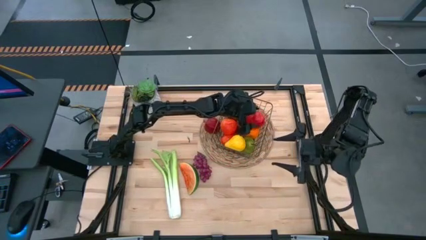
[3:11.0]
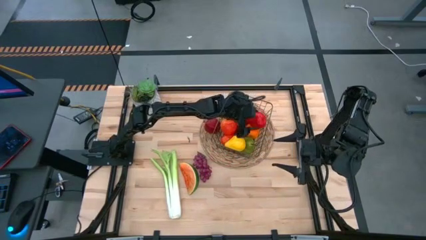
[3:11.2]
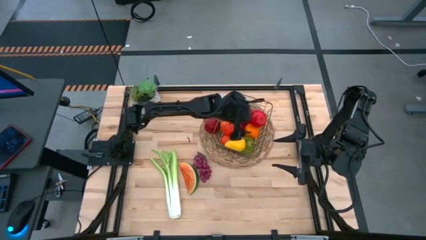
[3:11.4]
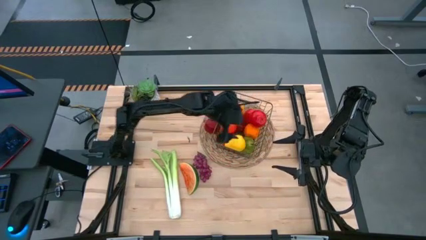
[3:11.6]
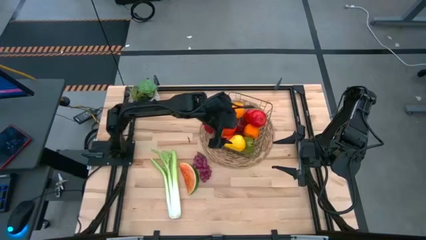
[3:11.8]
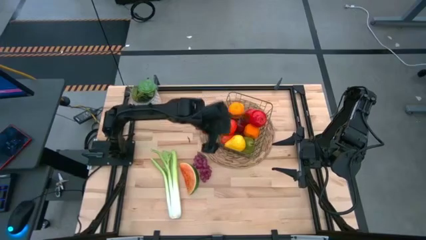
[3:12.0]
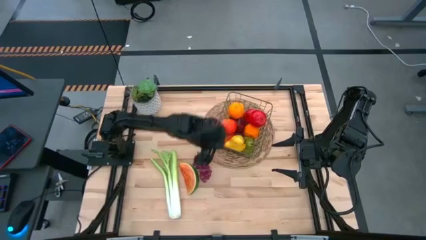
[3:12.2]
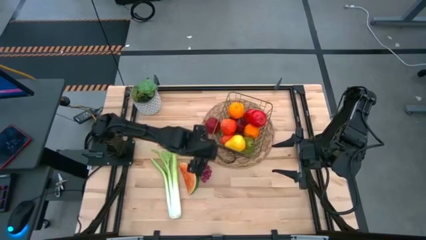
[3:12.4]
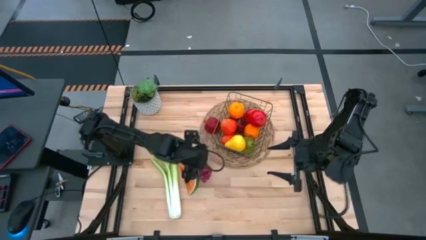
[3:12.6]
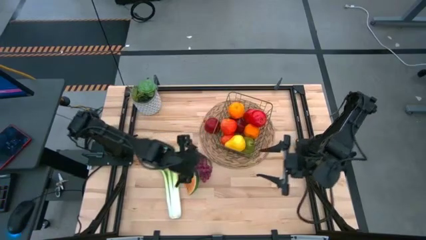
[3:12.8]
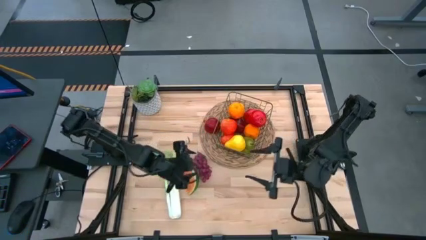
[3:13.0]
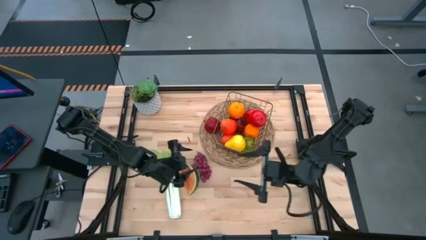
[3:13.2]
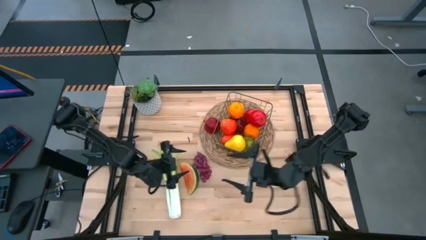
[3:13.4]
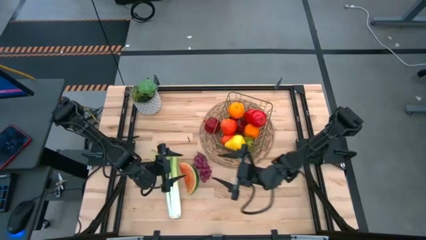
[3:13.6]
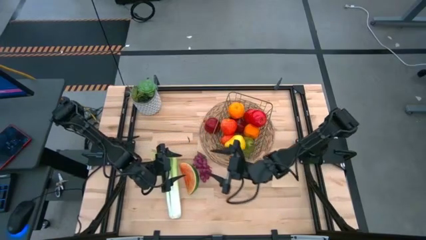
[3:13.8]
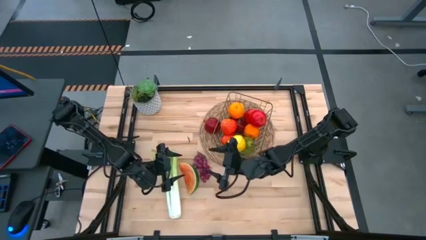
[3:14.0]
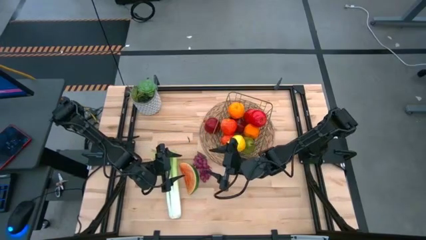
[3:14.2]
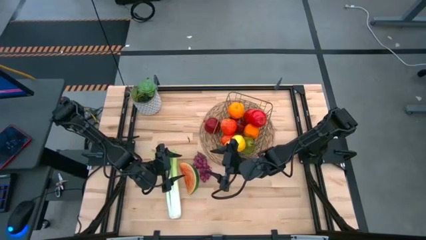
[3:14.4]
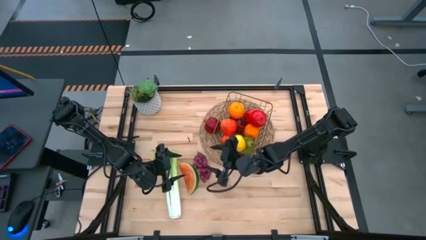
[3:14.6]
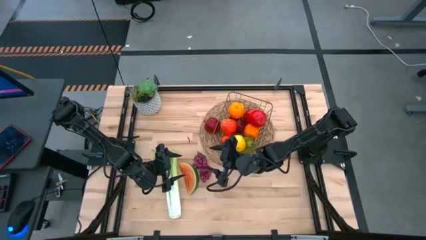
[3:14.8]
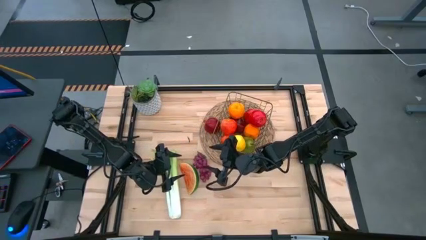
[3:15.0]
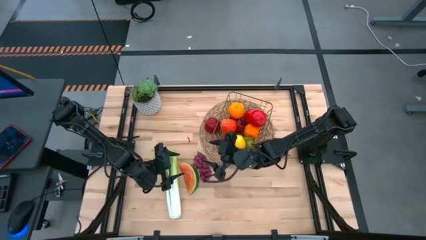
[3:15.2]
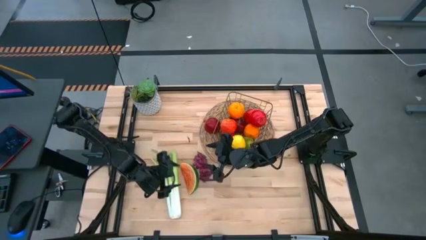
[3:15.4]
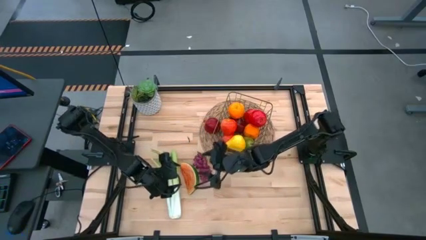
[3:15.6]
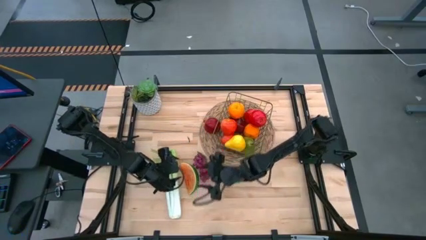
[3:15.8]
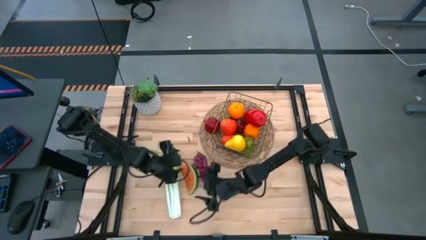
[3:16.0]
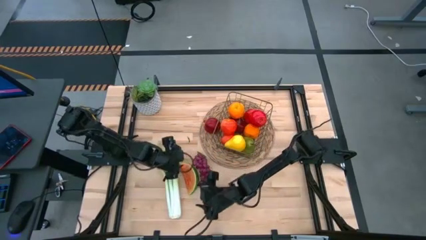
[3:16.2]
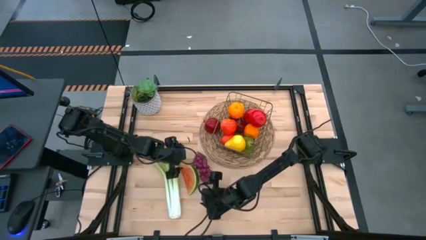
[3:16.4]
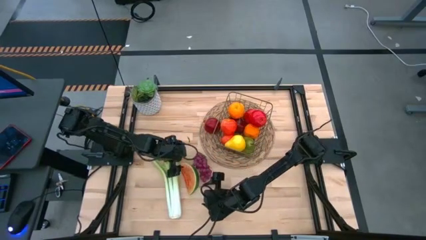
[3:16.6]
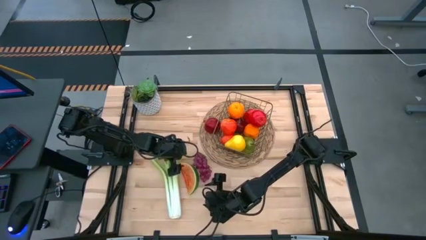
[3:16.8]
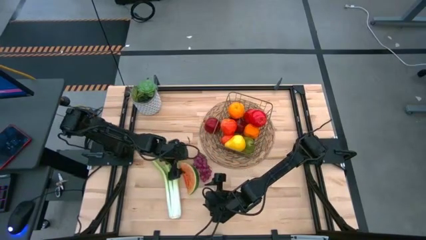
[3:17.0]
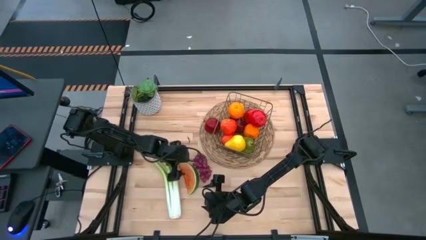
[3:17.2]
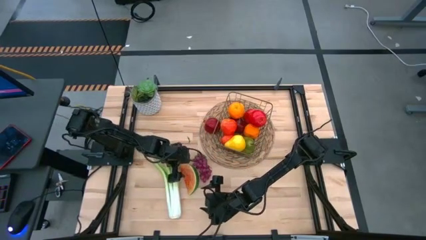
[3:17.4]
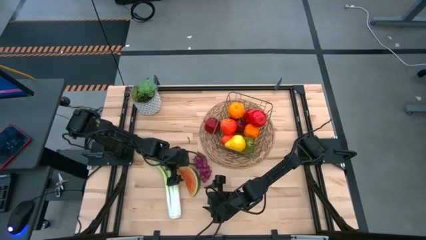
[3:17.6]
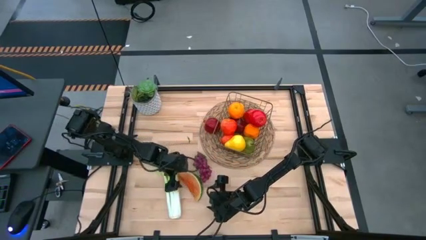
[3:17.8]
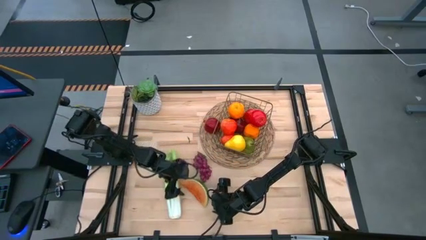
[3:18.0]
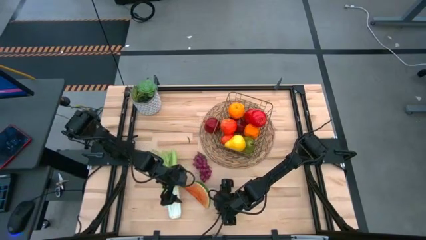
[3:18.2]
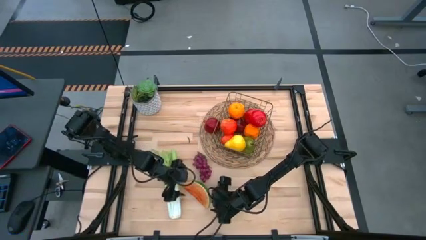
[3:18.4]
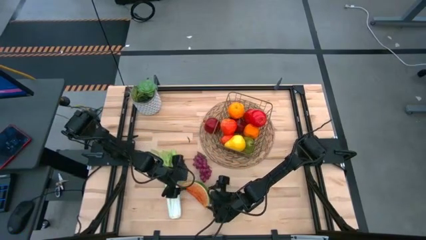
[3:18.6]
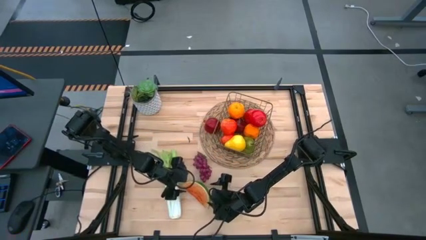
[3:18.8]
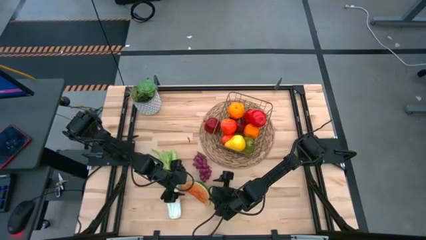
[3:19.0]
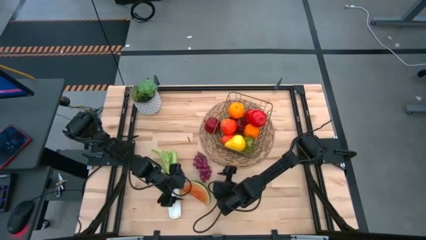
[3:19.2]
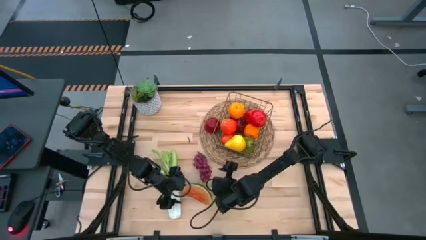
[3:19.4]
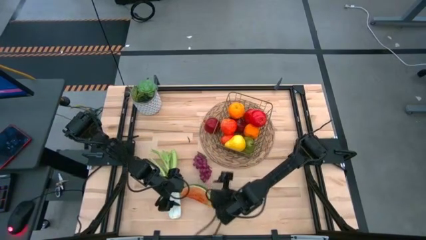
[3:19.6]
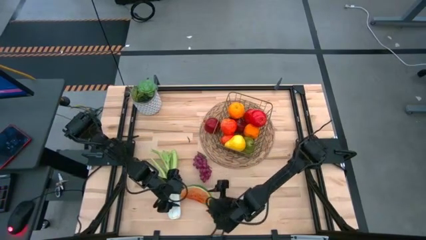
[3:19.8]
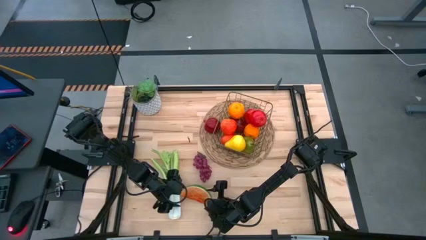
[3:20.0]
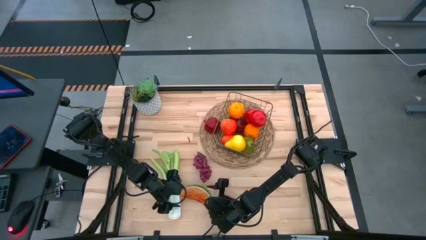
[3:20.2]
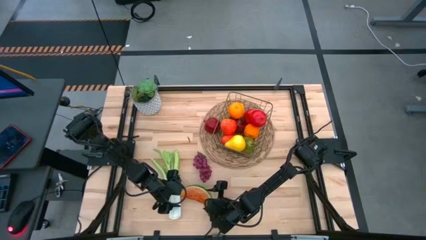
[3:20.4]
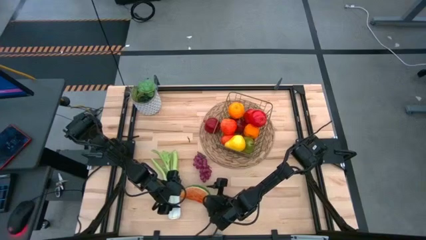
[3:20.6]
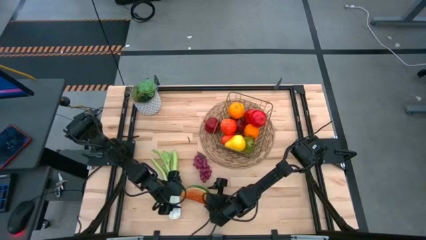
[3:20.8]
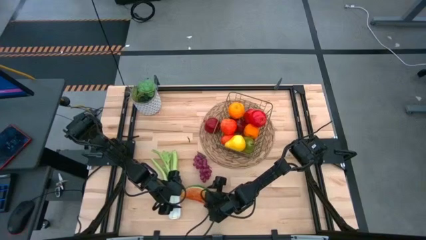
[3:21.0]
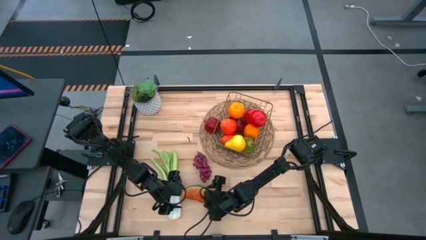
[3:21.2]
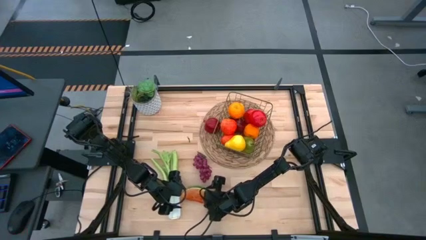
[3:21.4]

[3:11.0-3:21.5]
Task: Build produce basket
Put the red watermelon into the gold wire basket

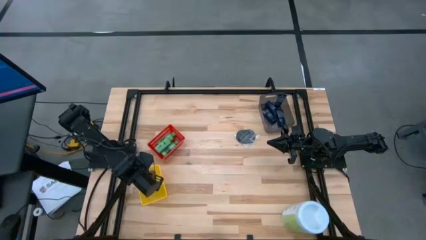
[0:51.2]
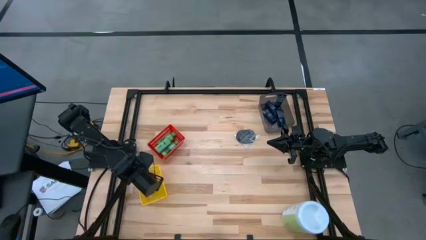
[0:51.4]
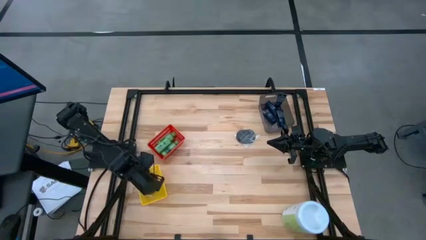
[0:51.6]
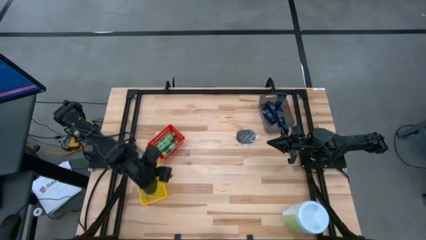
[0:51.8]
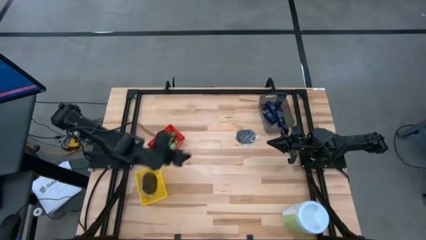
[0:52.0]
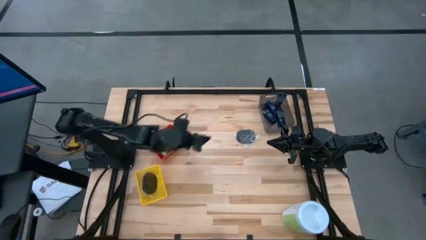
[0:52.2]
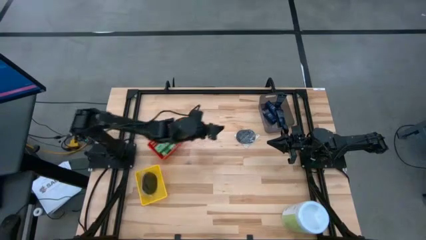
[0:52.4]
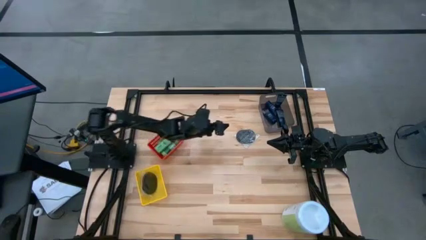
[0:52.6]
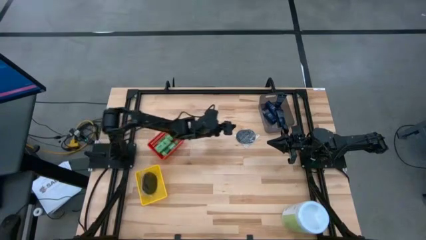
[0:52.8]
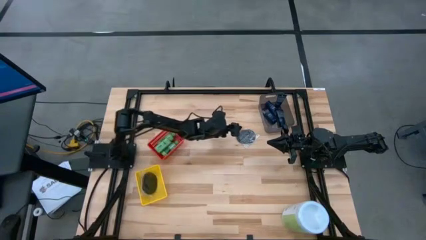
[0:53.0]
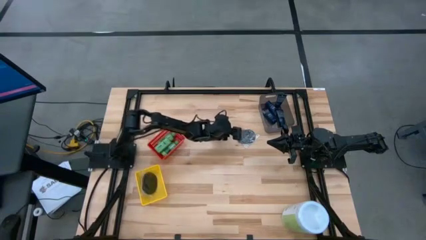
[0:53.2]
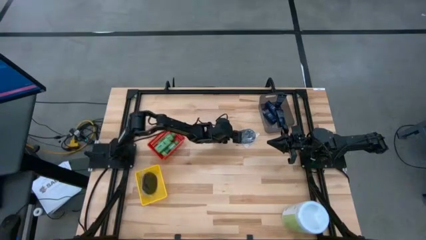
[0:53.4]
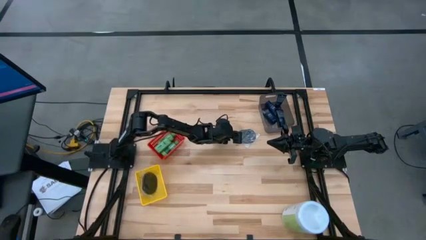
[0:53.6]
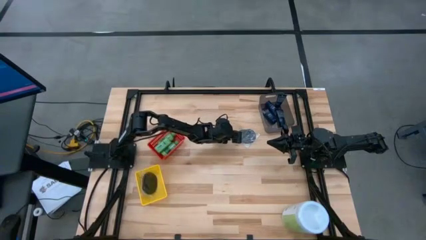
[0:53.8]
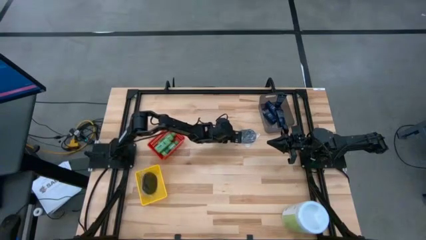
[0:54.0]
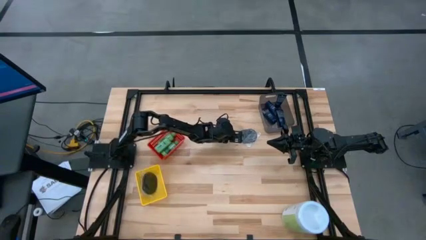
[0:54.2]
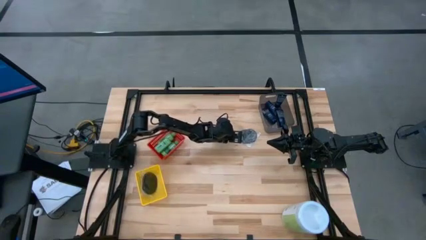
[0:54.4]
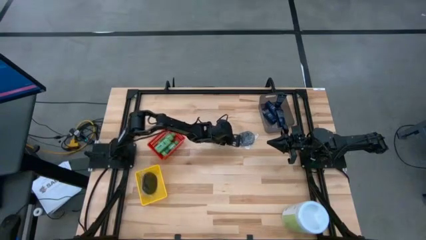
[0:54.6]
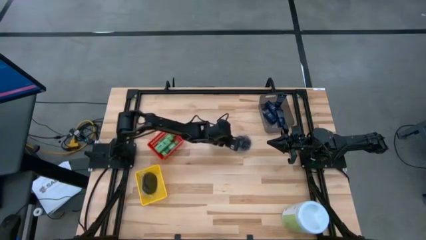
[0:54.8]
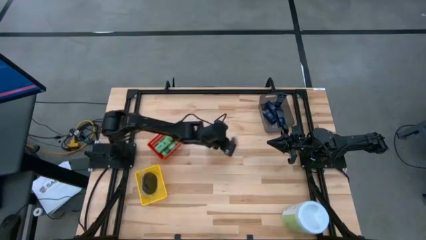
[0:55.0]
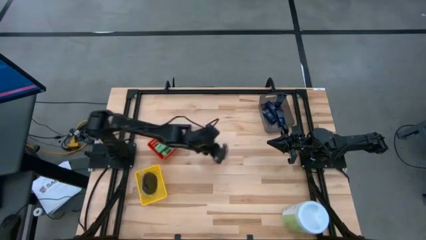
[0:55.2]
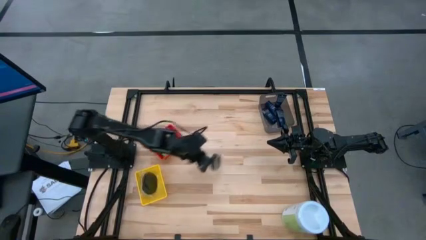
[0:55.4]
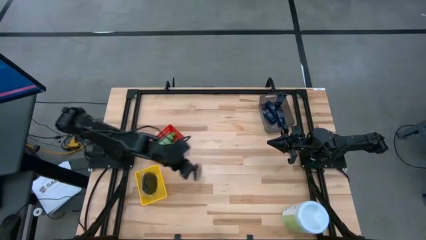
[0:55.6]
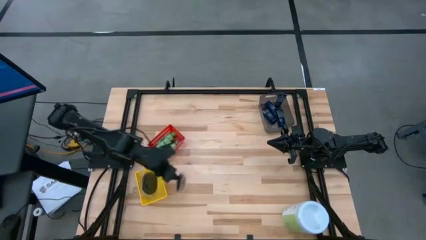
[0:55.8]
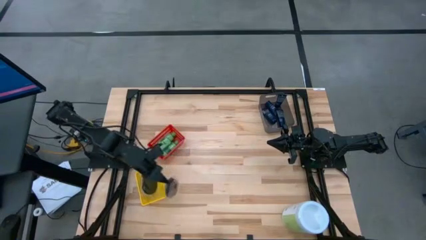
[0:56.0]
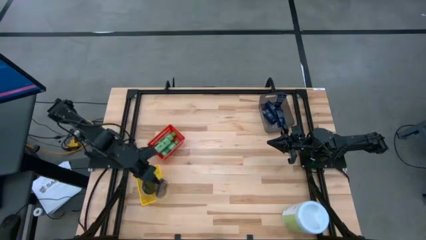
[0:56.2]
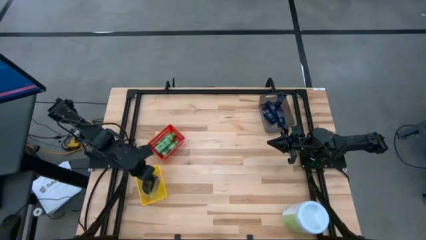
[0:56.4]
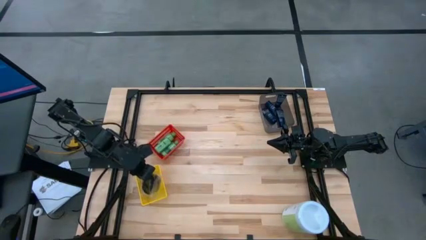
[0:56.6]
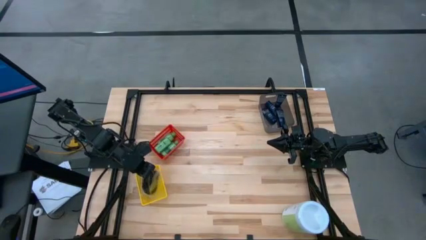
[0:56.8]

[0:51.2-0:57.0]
Task: Pick & Place Travel size toiletries
Put the brush into the yellow bin

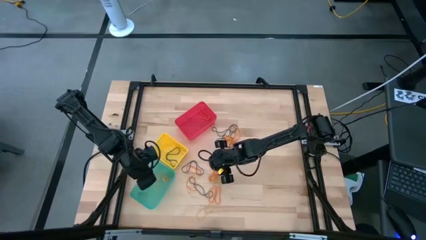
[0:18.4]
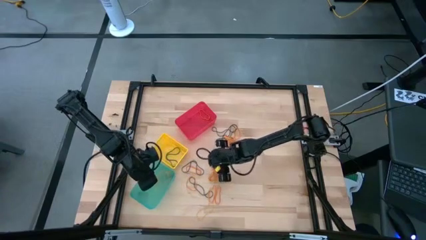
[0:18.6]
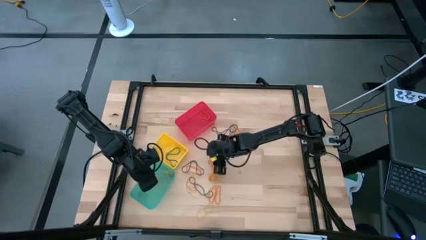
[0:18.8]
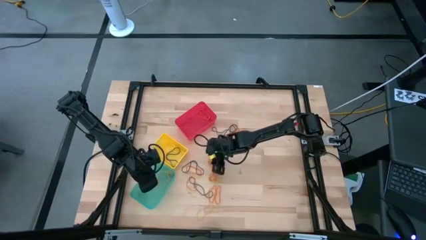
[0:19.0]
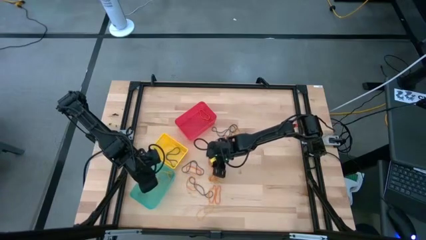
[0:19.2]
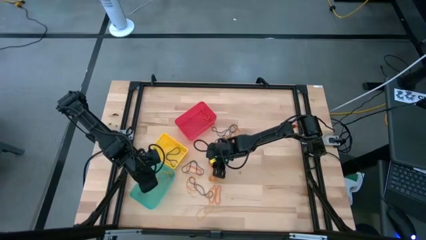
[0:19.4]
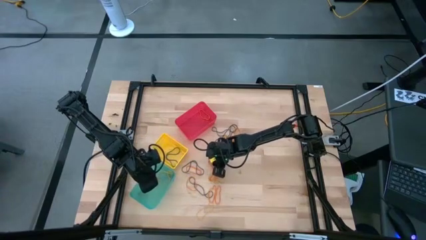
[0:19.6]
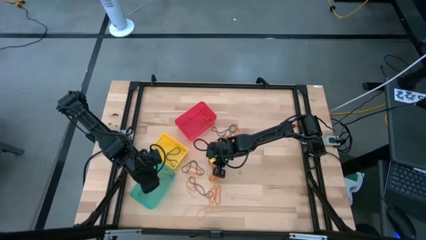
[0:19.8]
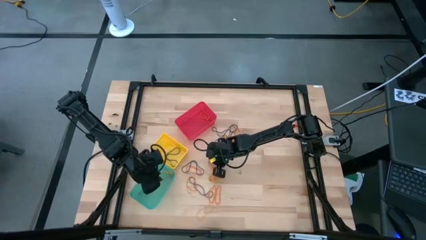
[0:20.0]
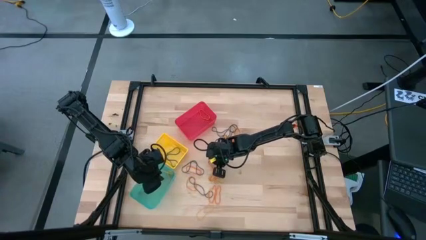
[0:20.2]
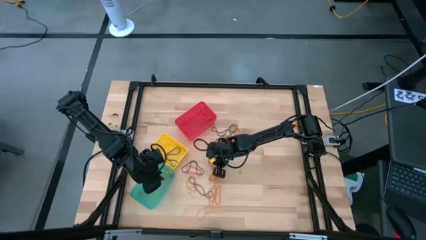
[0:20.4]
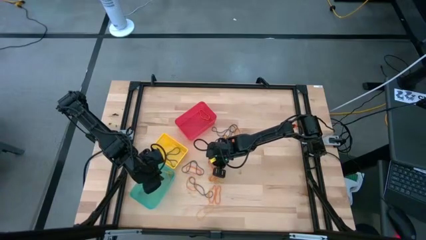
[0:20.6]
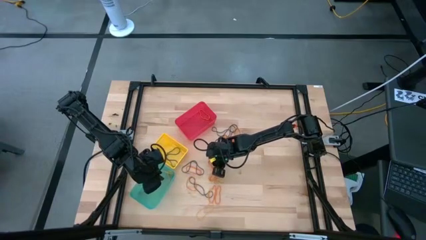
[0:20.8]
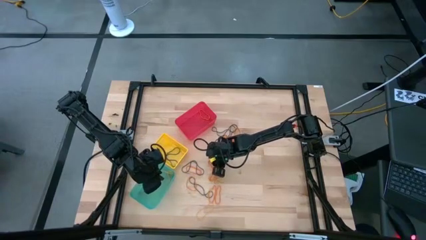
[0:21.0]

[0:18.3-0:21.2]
Task: Sort rubber bands into baskets
Put the orange rubber band into the red bin
